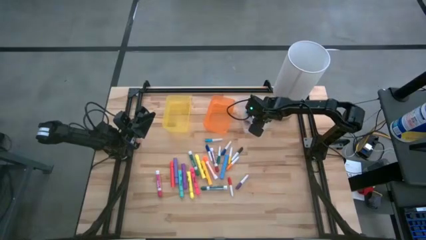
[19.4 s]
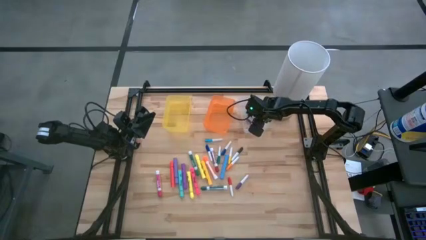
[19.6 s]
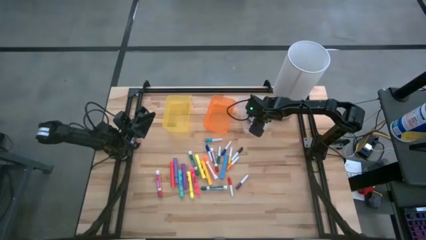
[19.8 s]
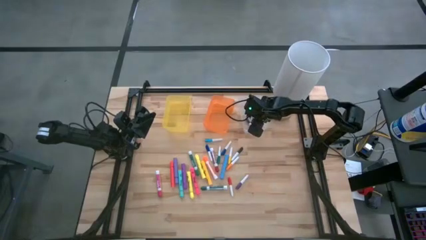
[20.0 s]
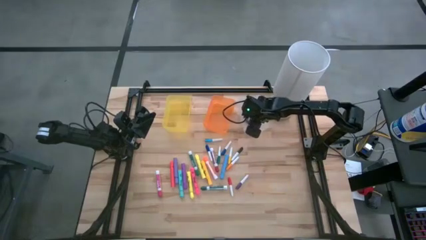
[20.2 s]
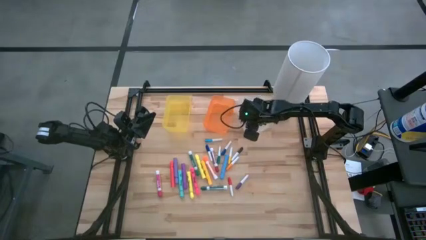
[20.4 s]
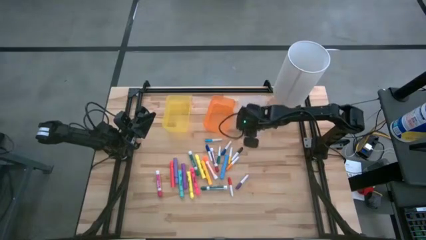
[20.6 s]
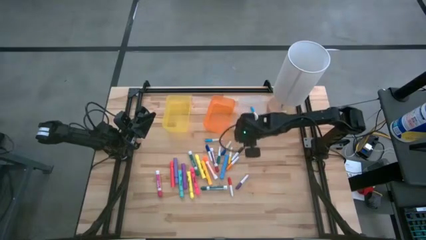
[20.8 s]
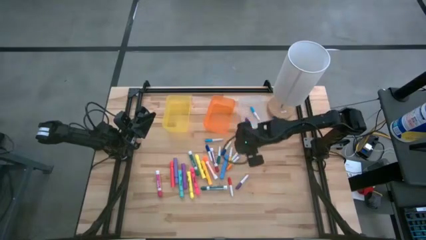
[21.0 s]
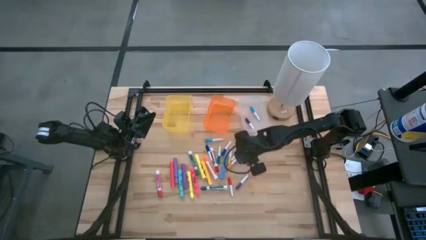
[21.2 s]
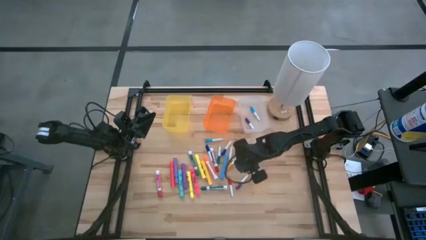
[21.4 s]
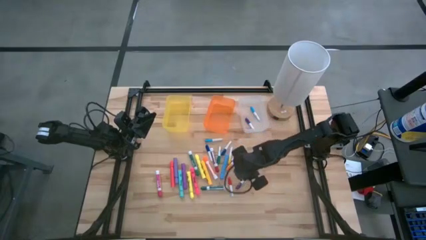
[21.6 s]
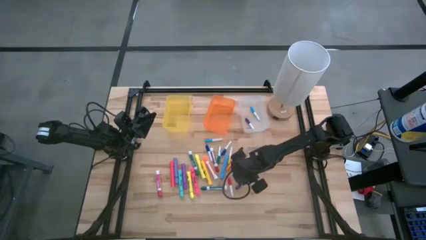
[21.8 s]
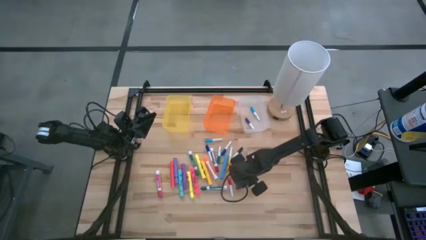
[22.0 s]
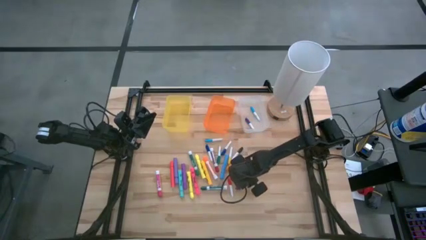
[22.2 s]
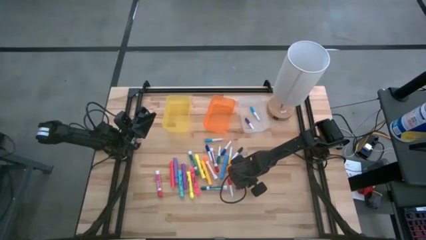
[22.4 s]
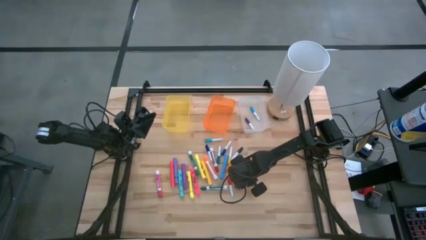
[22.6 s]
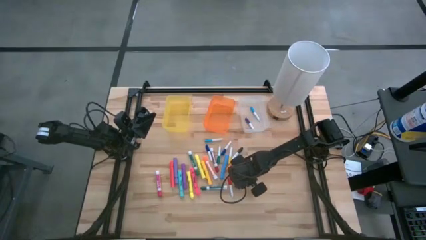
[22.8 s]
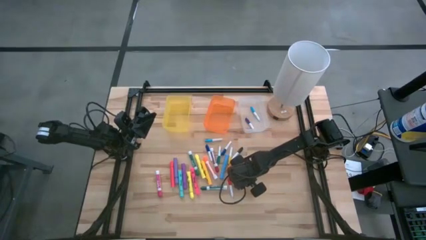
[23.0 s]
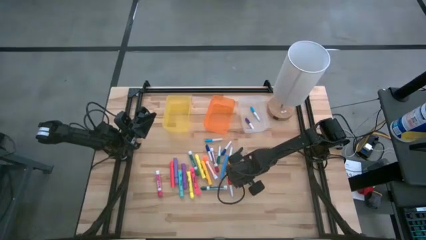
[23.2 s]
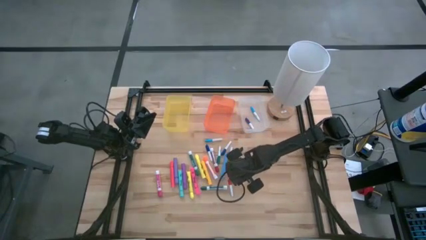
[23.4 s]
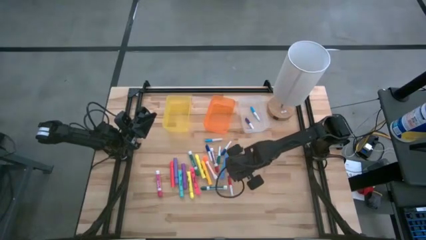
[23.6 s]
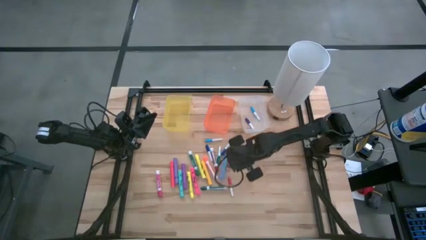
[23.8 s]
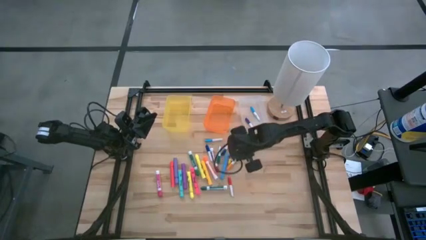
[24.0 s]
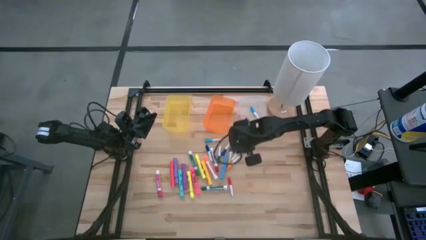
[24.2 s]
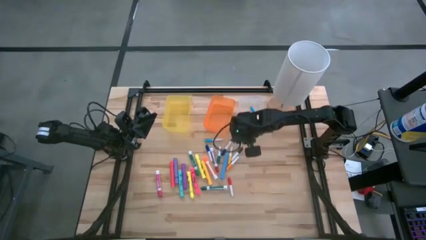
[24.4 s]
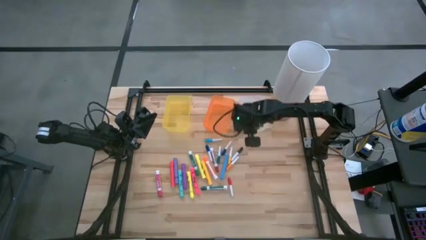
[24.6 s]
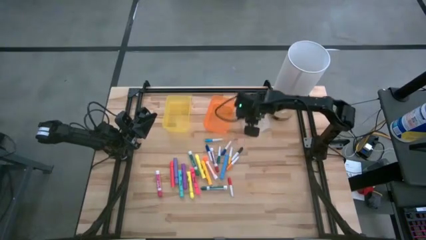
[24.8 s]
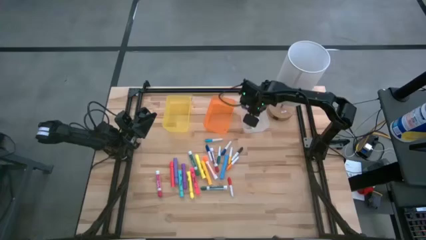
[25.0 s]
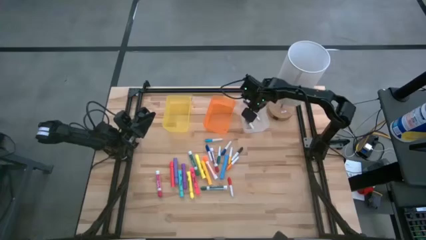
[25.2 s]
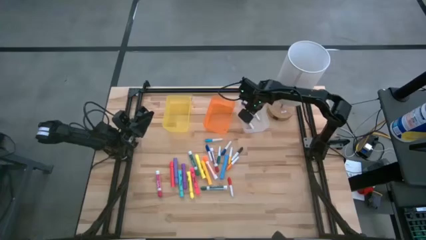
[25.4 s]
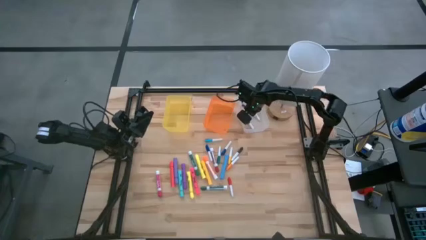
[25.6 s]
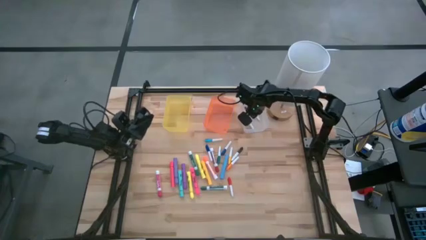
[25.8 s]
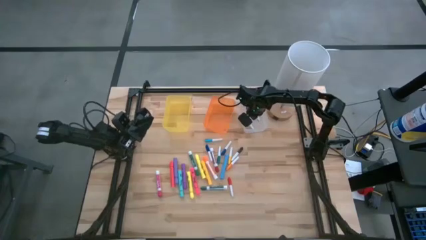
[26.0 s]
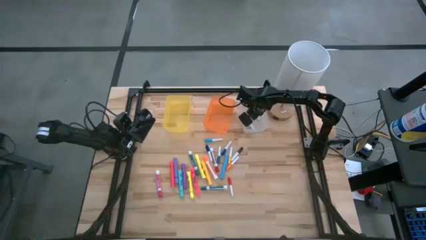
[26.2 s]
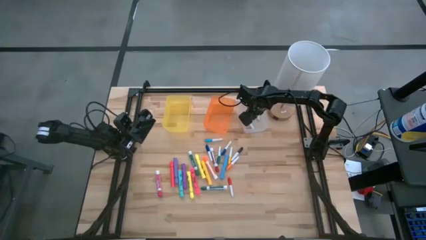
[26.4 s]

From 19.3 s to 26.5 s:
Task: Pick & Place Markers
Put the purple mini marker into the white bin

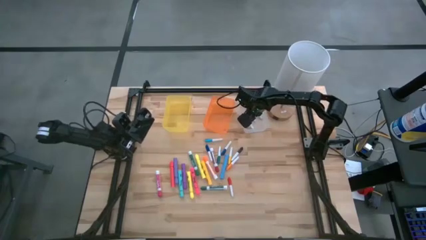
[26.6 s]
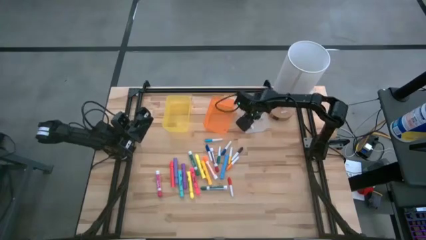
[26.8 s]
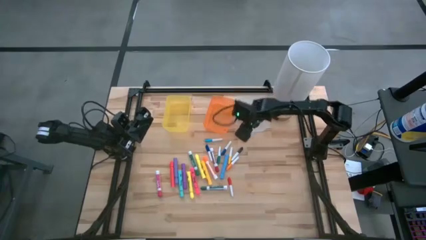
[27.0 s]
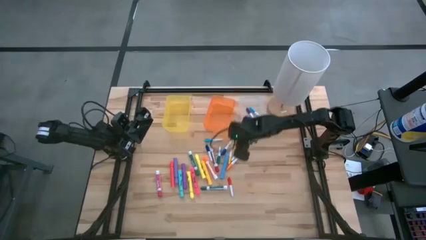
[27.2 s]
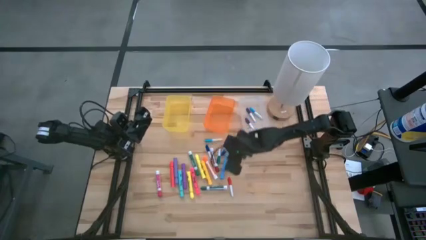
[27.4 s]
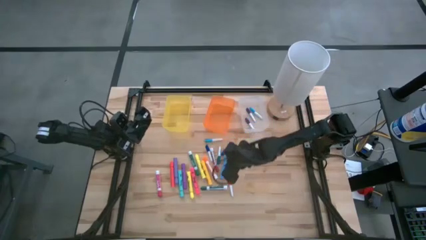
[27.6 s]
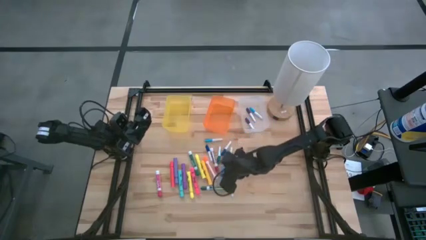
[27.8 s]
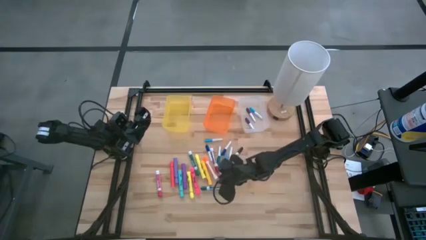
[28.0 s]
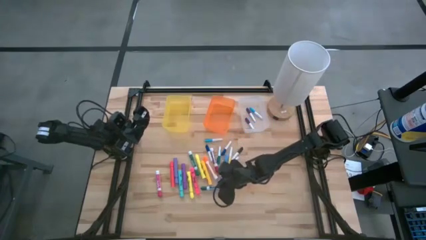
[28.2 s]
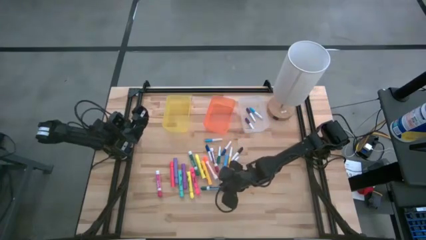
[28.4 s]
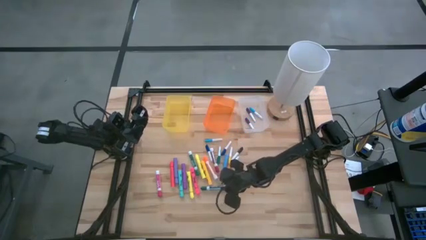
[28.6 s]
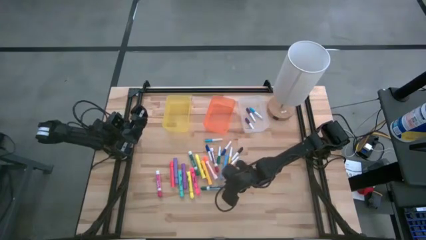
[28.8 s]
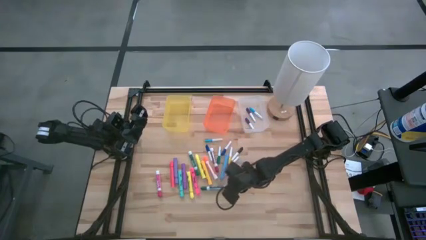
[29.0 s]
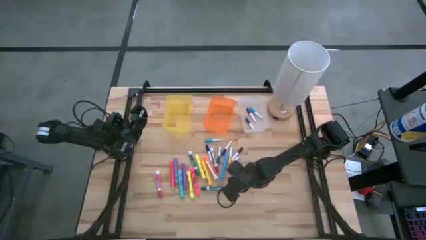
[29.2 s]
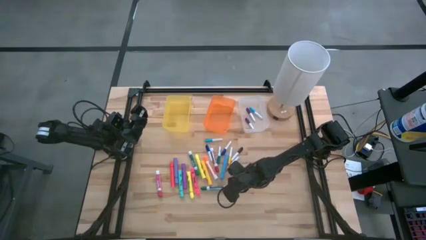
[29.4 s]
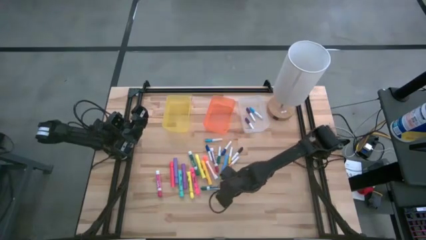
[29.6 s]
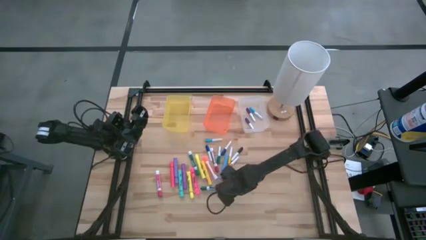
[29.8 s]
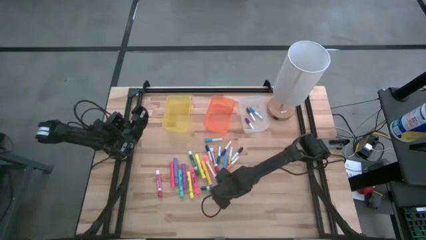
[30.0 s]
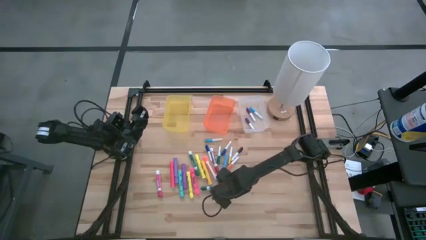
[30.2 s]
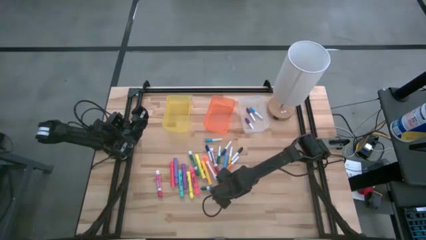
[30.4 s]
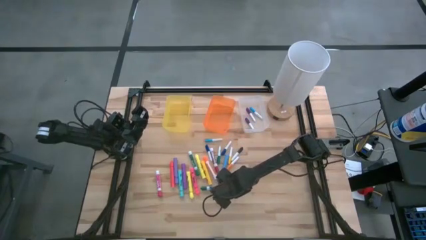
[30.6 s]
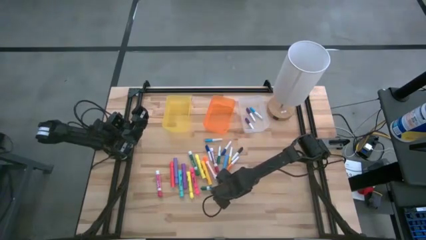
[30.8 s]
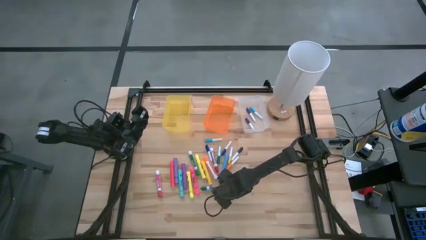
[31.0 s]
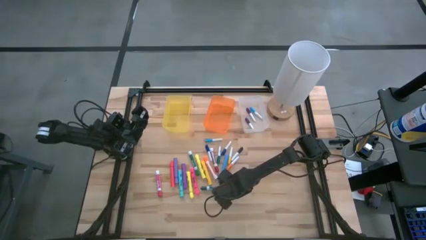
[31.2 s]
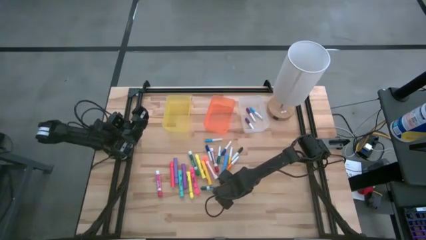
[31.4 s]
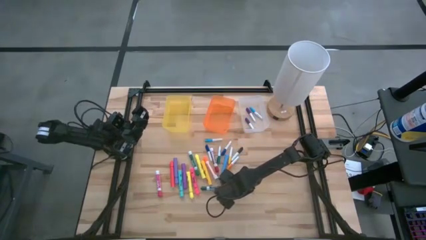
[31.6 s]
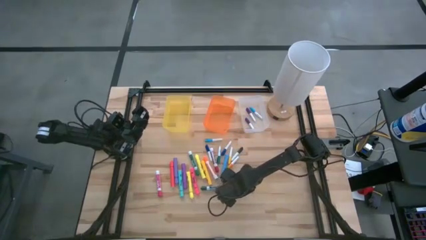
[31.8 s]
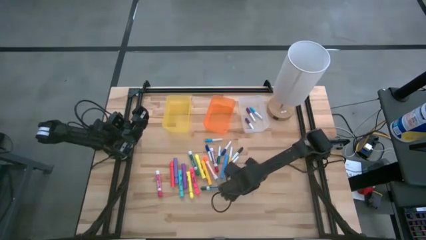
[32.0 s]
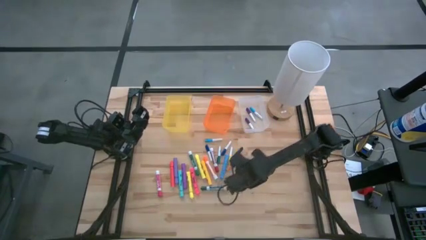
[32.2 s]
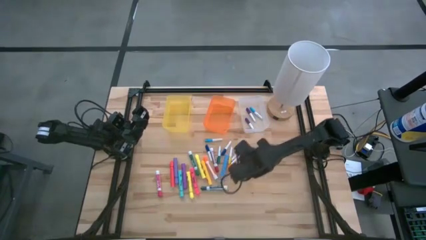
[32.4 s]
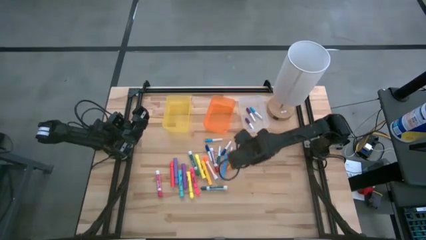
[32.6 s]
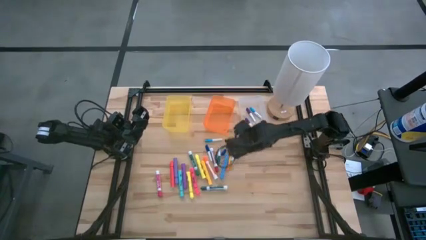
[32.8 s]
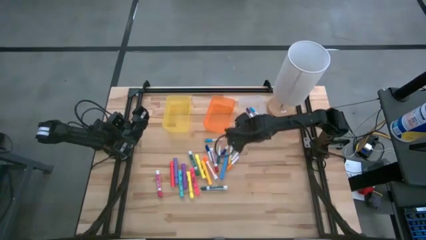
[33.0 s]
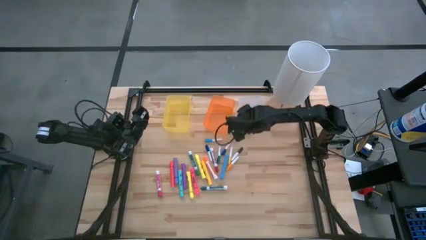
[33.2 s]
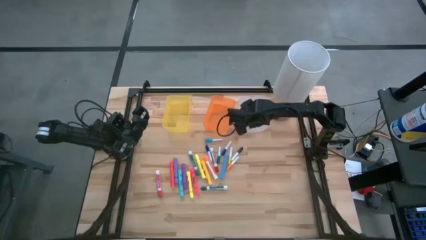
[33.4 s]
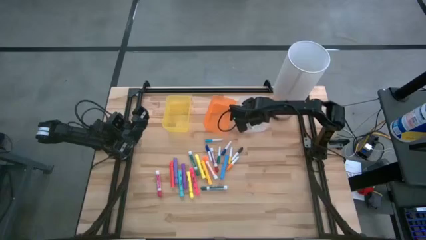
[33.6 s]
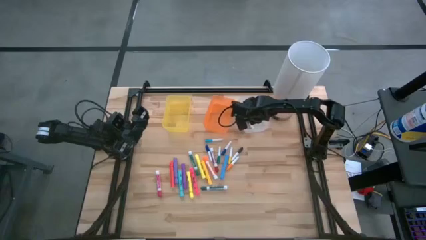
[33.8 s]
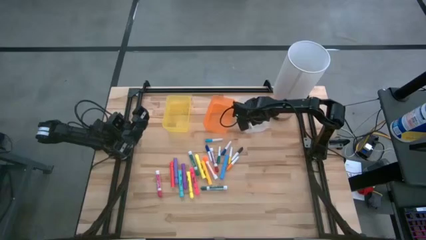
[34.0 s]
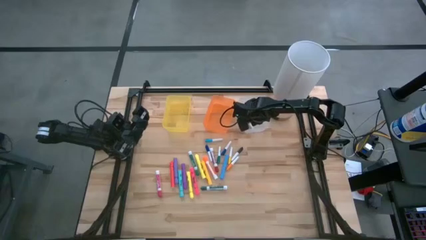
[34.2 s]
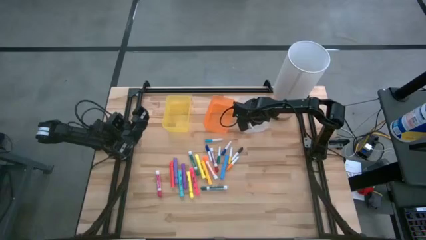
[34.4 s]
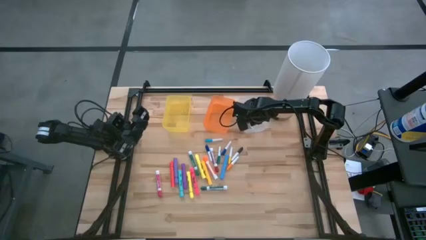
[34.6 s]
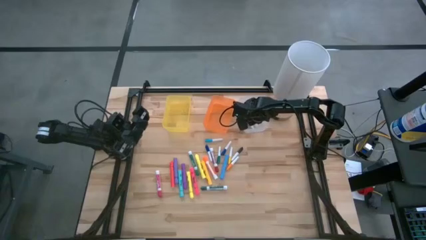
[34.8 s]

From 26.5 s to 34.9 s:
Put the red mini marker into the white bin

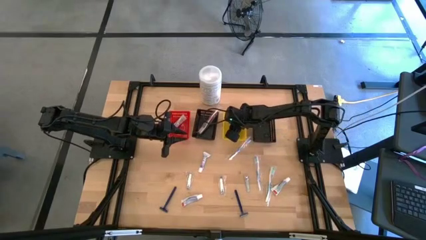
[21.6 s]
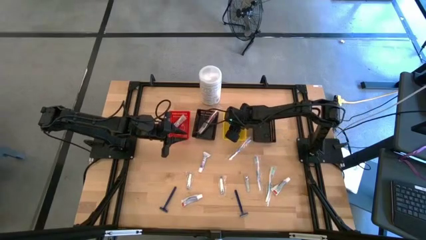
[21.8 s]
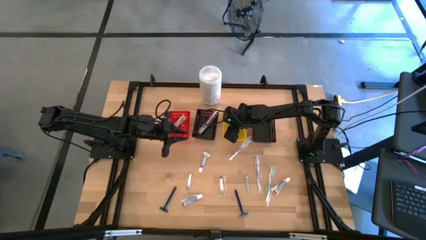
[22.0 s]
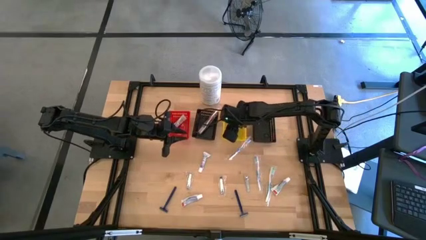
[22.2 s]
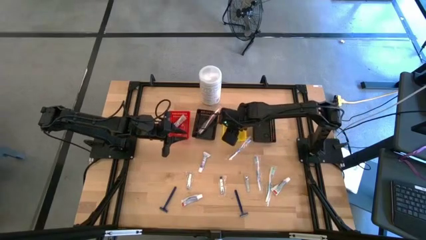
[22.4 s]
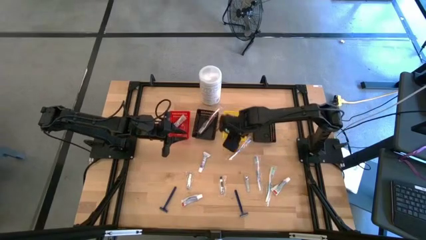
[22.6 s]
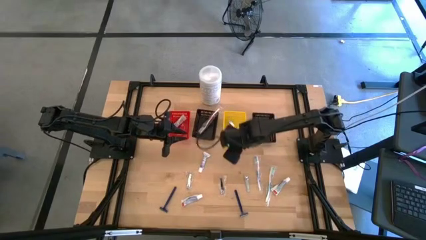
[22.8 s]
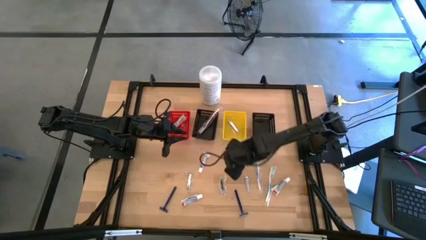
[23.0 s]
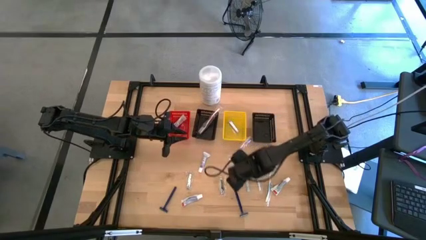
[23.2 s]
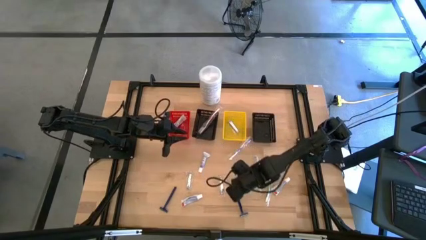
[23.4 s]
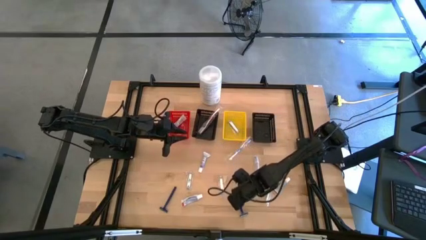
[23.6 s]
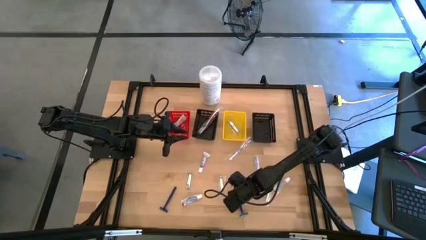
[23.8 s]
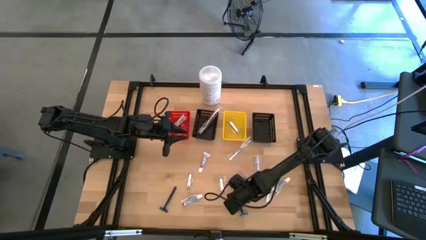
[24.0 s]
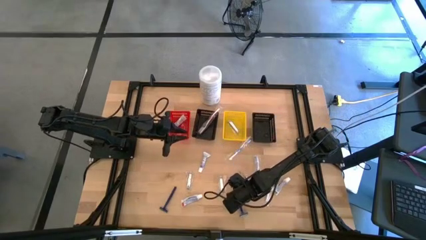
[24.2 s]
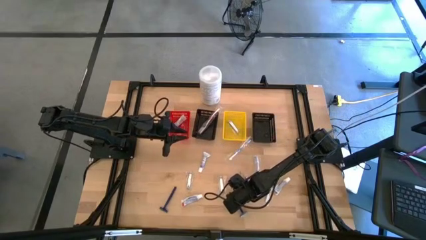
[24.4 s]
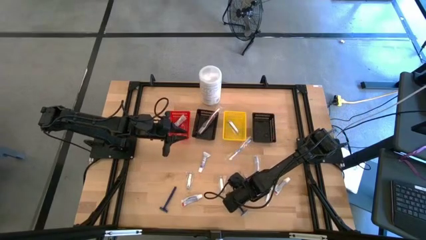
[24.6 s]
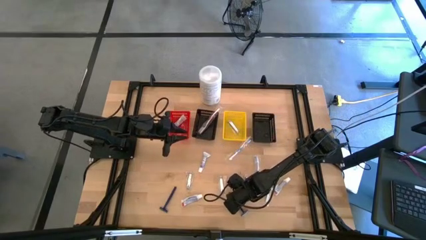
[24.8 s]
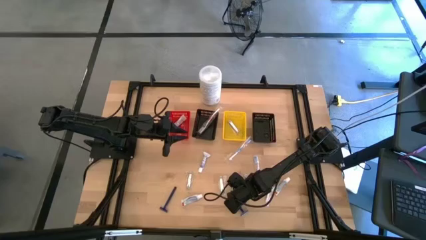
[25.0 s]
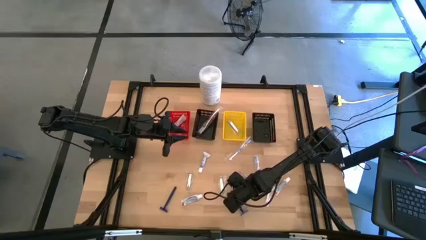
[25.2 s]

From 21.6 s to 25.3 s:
Task: Pick & Place Travel size toiletries
Put the razor into the right black basket
